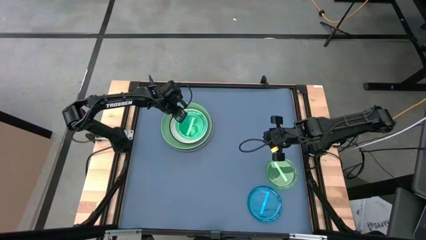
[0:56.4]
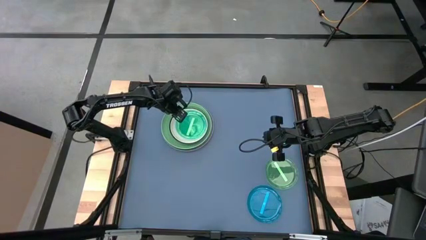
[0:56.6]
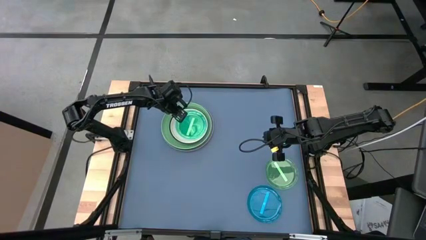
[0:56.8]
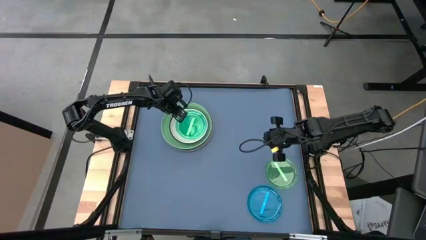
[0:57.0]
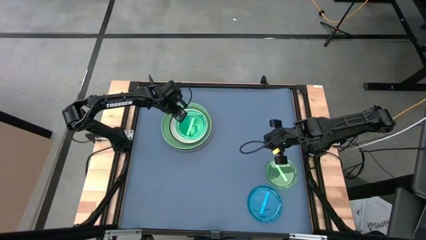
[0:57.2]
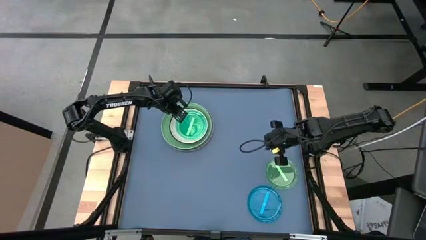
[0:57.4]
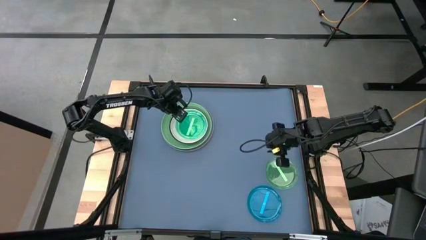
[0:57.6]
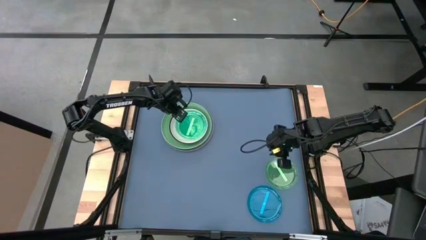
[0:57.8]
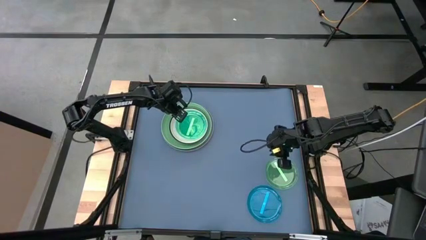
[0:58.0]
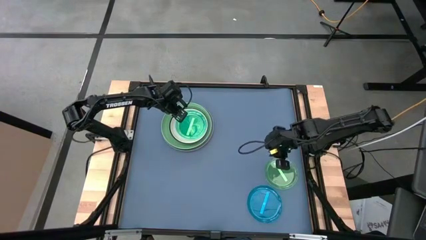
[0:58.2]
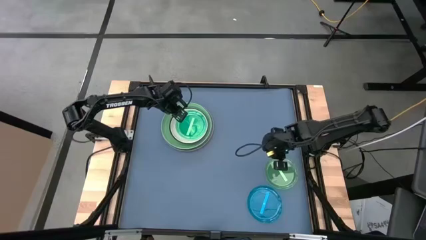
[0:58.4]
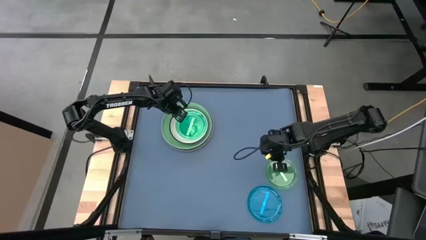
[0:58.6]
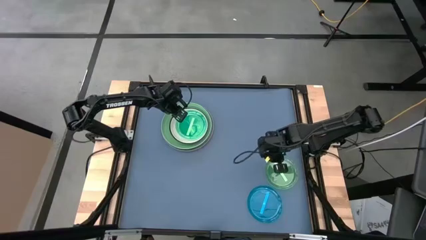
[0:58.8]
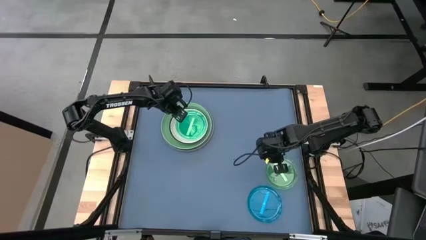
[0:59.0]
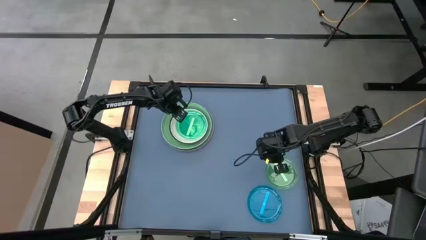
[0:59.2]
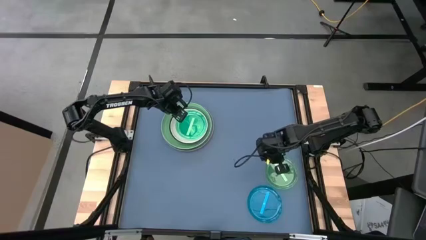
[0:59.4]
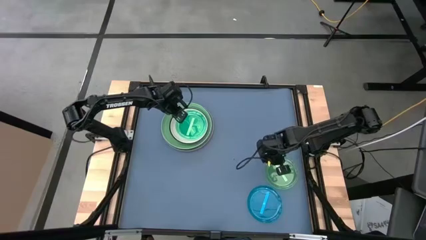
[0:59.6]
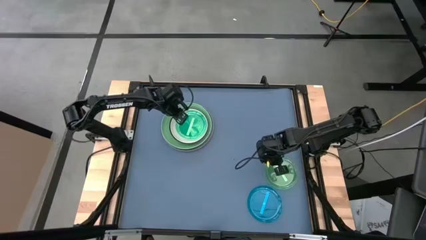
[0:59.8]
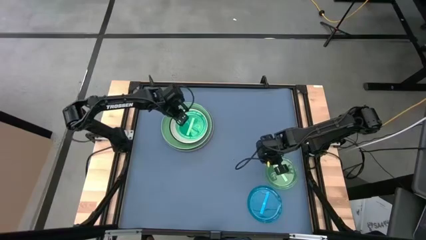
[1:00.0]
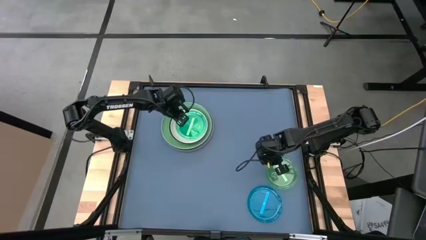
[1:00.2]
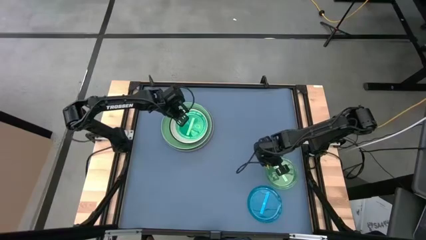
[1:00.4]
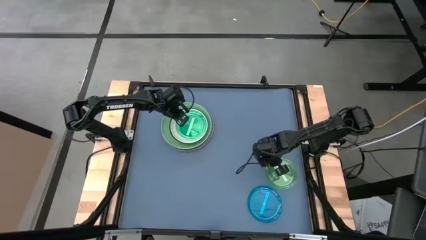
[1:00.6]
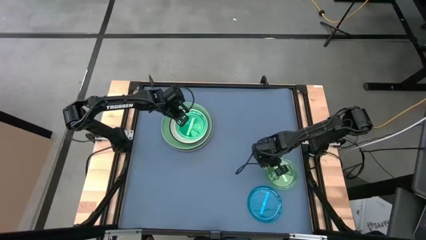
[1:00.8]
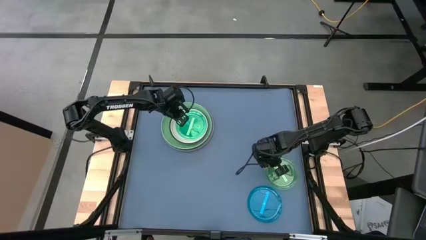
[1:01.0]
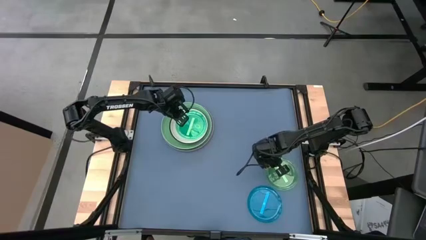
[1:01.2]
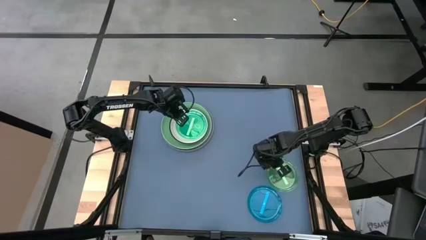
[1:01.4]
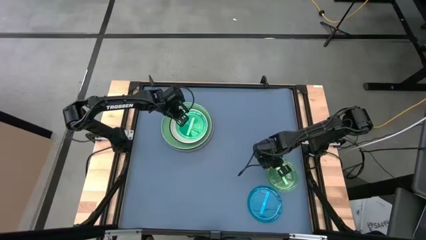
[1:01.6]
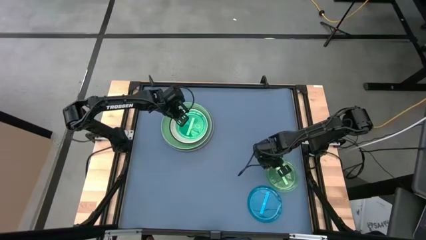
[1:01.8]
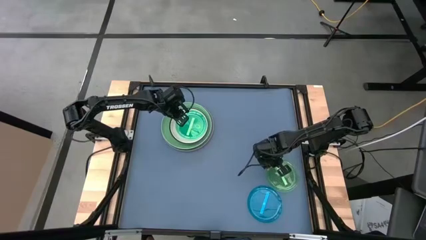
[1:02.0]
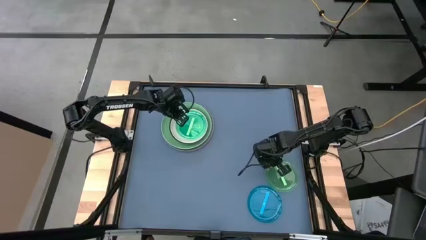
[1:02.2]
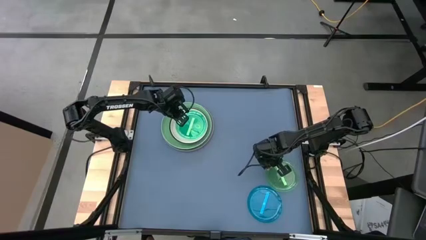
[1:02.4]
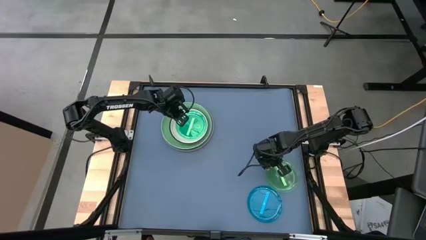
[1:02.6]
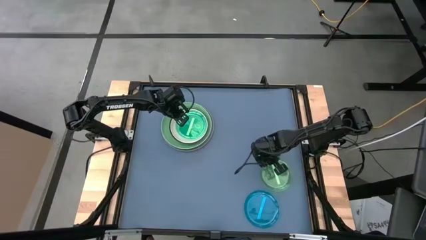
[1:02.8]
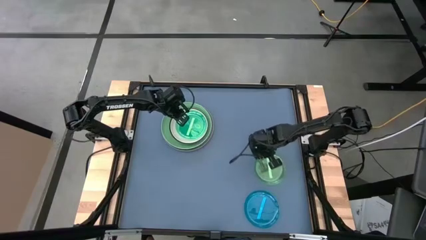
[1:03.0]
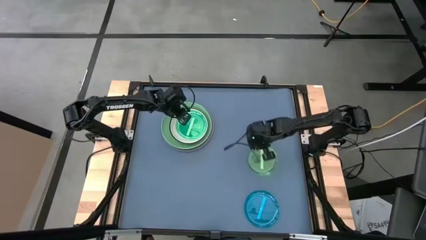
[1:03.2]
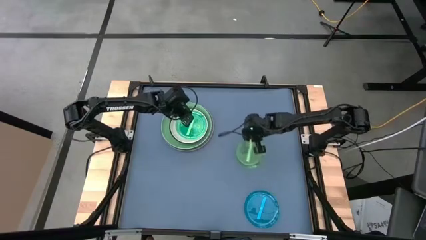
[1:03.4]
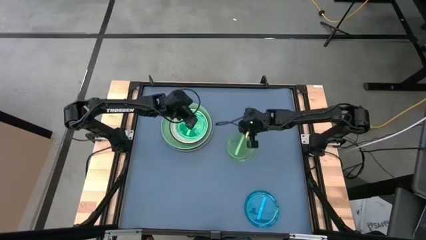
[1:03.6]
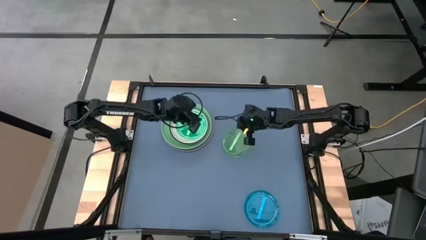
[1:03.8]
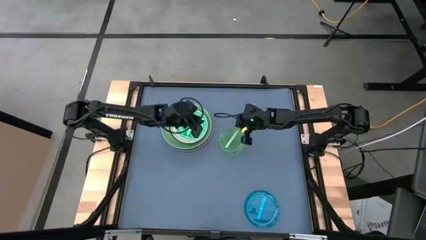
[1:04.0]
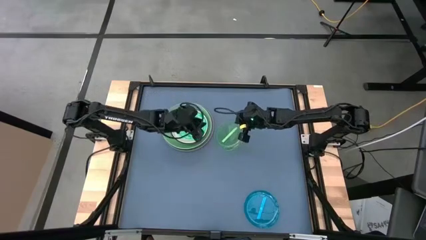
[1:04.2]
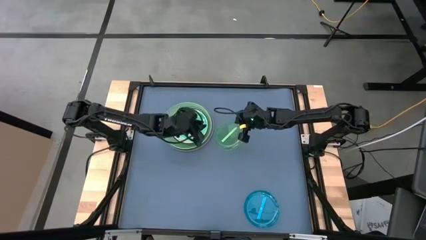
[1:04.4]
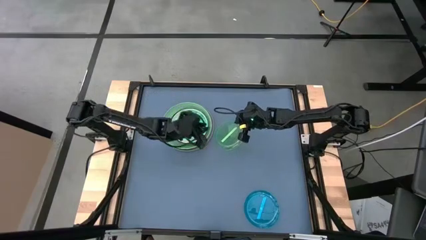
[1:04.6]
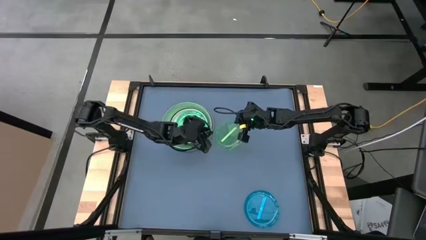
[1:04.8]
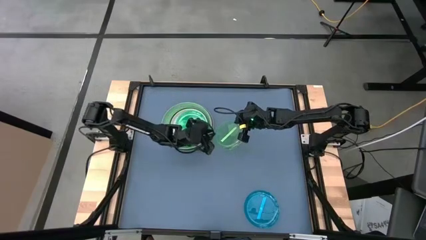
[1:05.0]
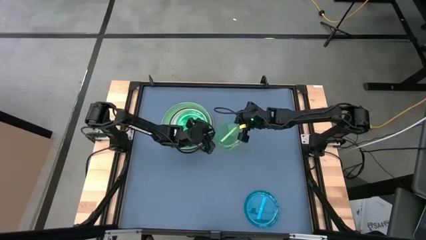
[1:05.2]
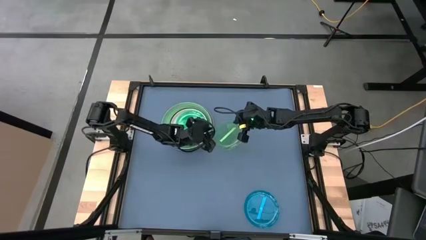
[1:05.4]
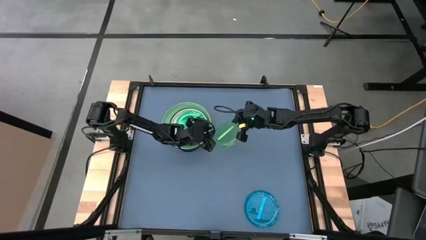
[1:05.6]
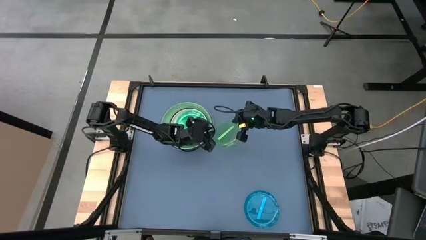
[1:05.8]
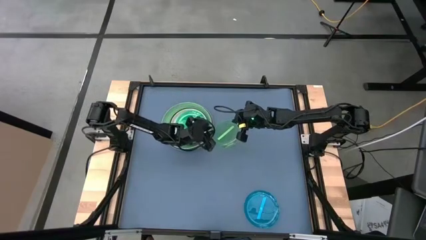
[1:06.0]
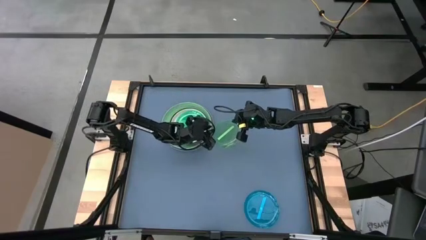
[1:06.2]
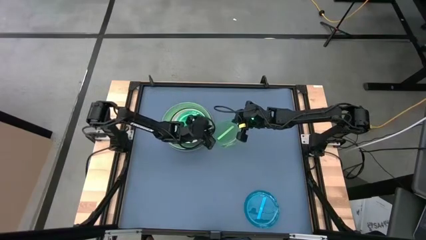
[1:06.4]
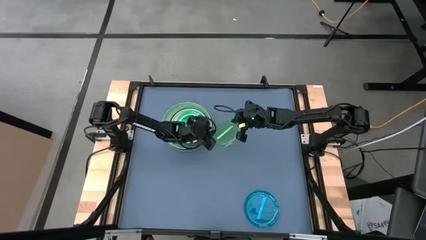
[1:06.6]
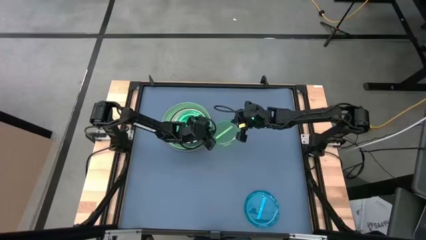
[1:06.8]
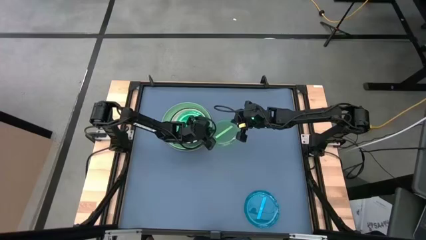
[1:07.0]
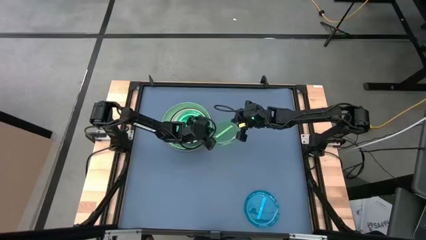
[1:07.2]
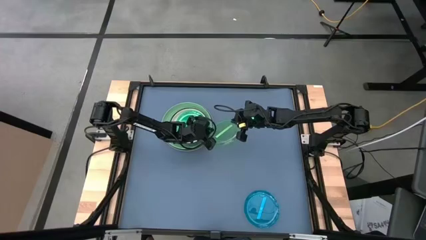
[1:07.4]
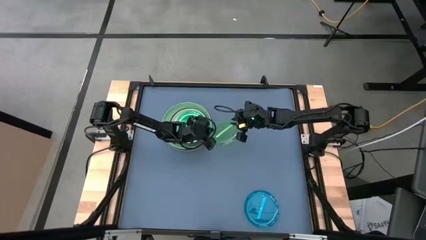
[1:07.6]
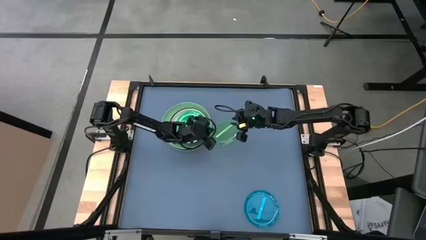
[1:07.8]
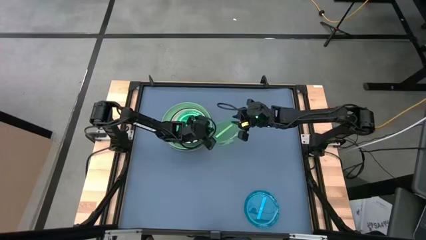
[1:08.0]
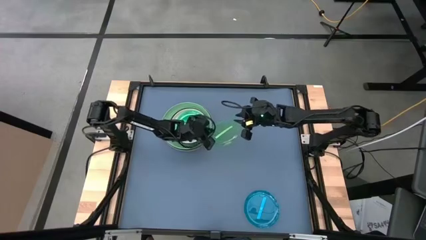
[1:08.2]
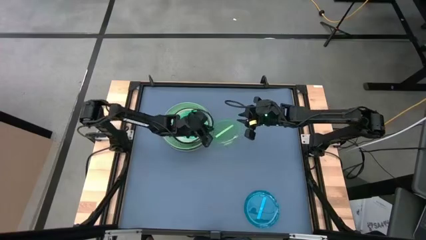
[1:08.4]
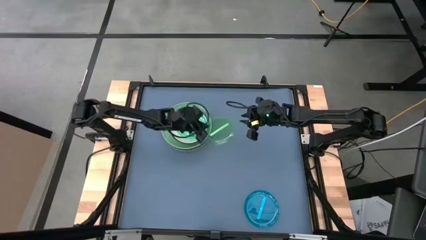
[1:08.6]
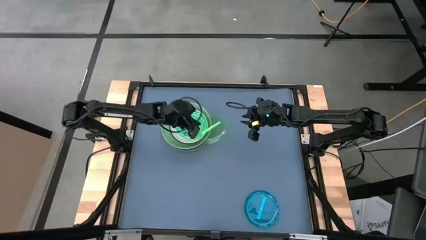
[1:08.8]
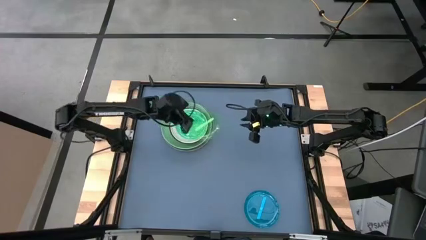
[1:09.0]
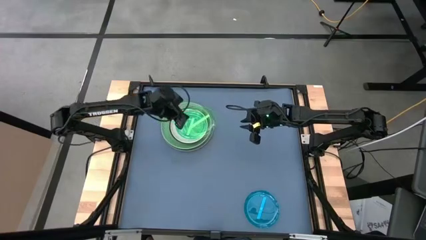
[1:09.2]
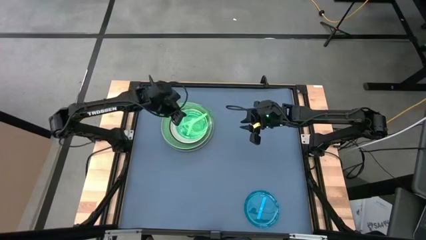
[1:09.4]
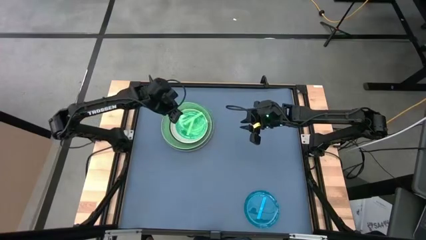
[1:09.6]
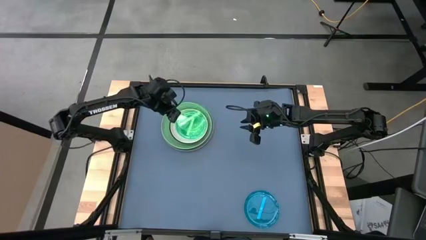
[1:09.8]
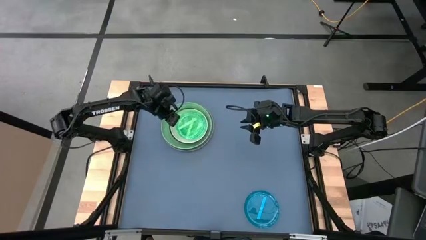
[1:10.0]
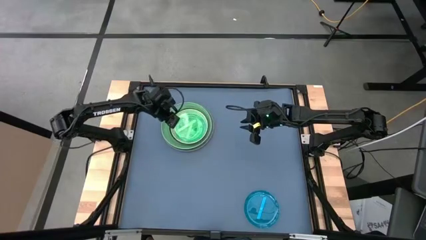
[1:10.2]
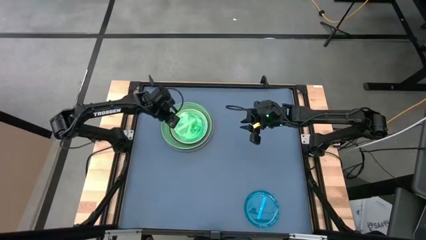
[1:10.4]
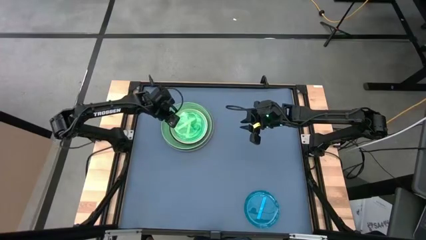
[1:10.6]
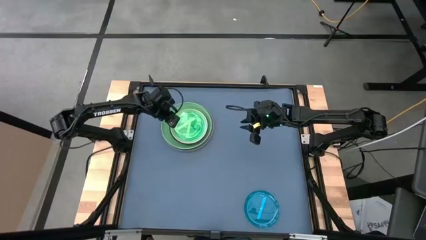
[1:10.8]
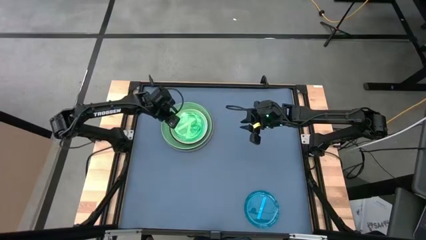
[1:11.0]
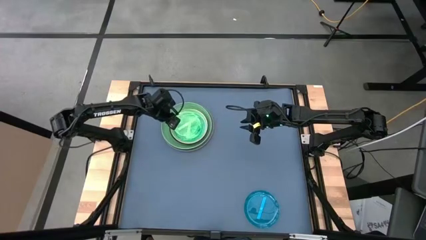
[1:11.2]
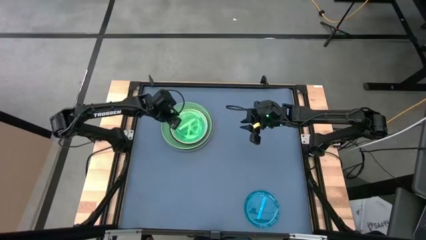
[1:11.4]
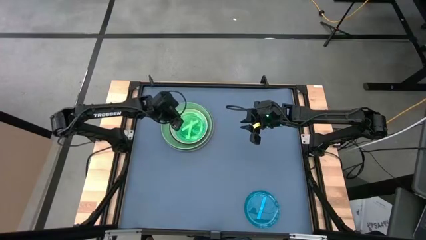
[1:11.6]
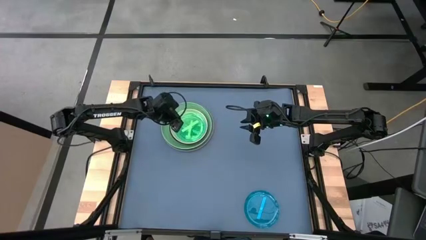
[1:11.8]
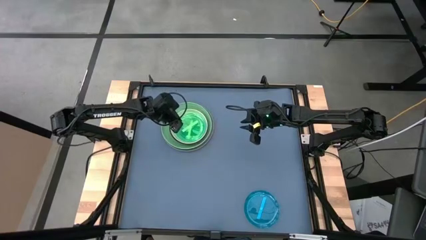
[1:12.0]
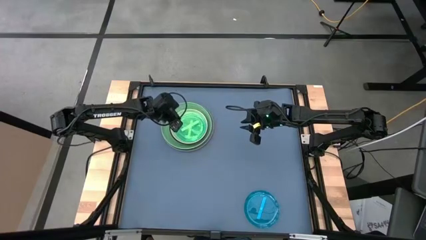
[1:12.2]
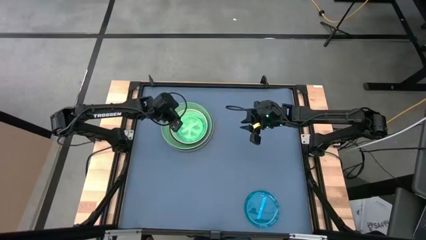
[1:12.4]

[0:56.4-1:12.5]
Task: Stack plastic plates
Stack the light green plate on top of the light green plate
